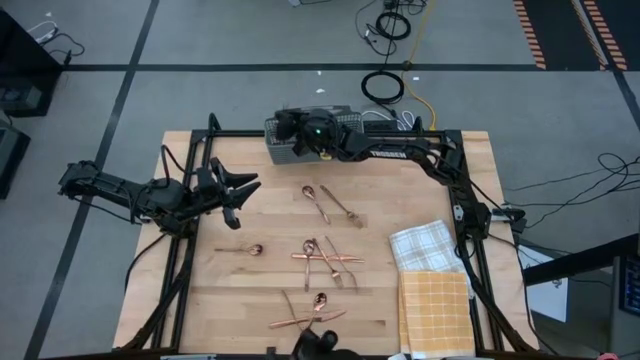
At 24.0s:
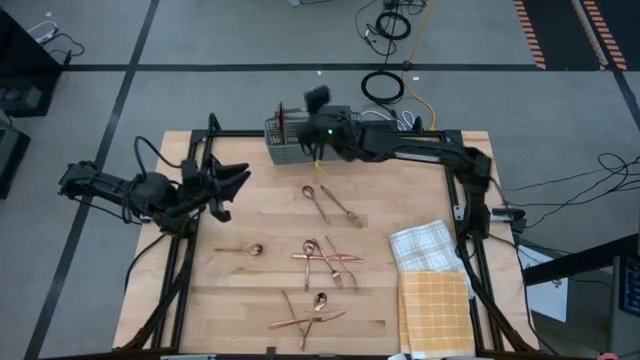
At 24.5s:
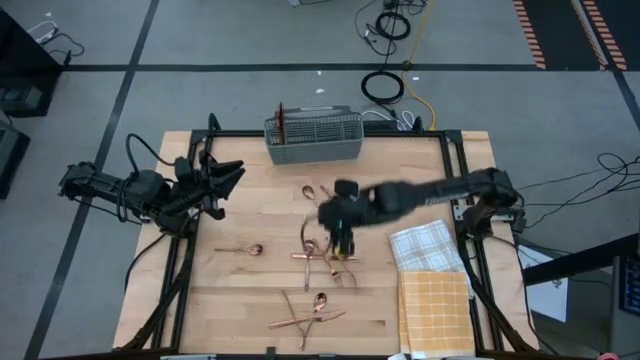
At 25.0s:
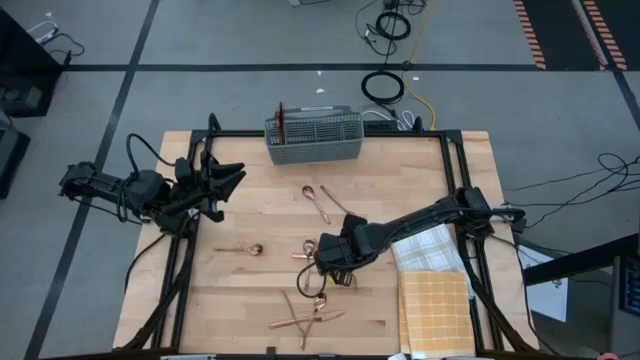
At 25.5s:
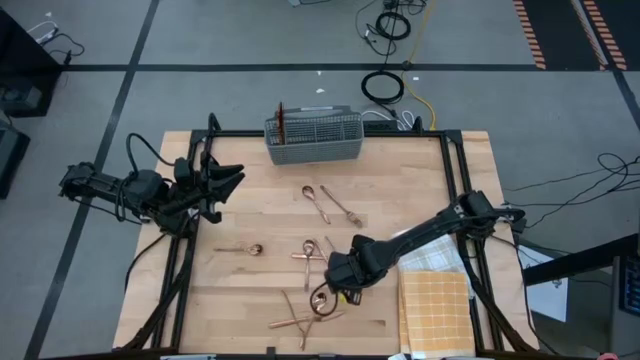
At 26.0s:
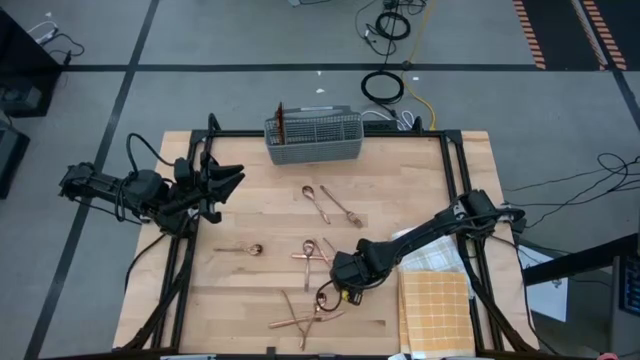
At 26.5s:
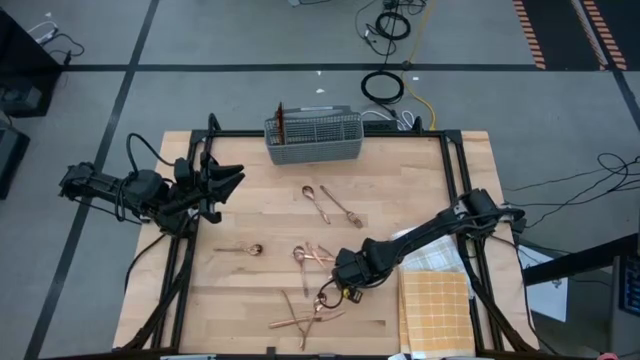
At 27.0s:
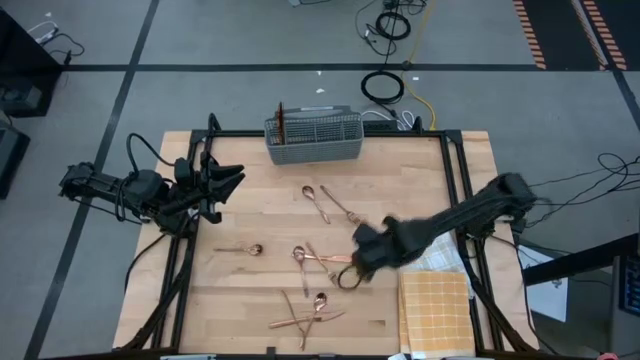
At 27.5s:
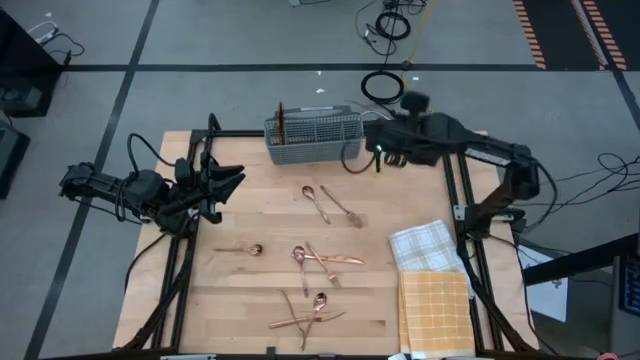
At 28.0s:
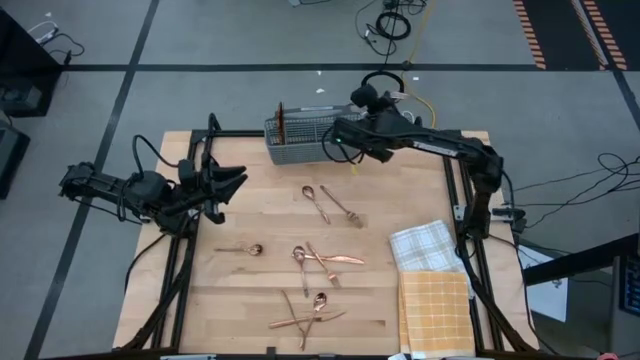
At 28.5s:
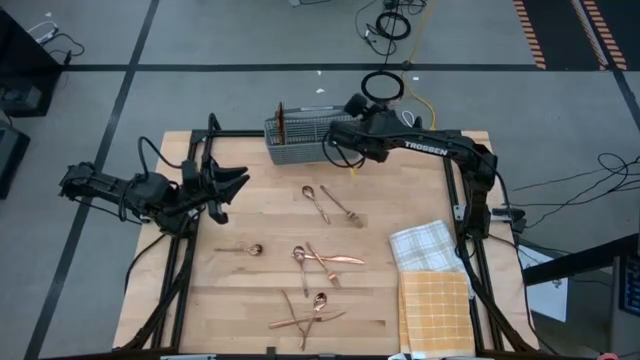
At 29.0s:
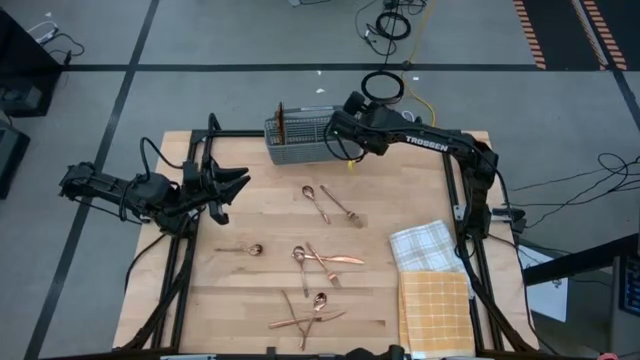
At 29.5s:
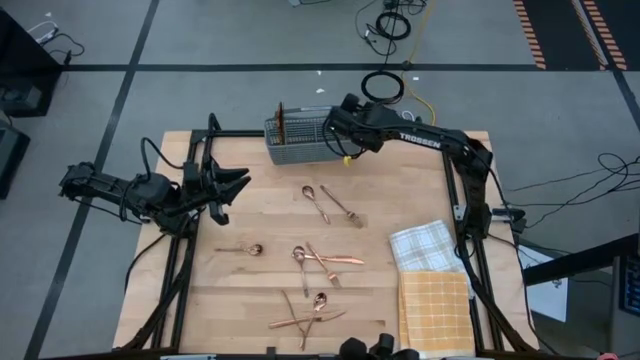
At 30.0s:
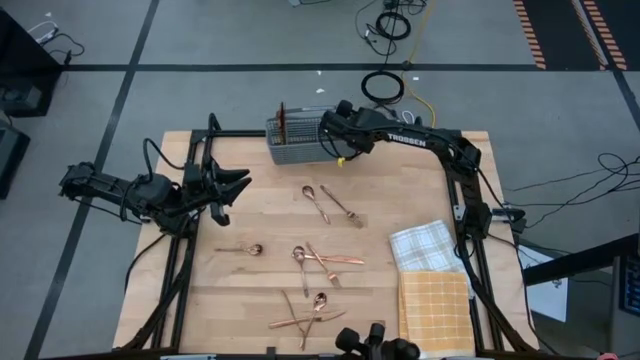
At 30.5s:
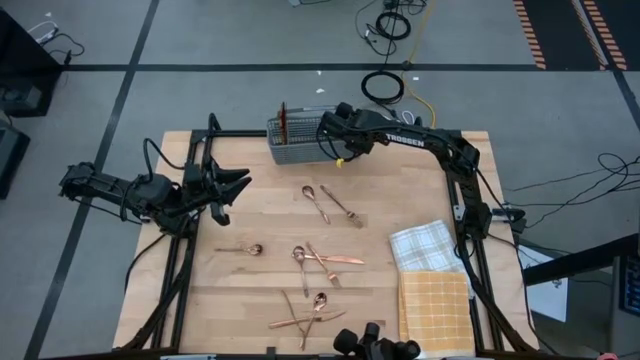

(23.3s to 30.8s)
Task: Sort silverware
Put the center bronze fork into the gray silverware rack

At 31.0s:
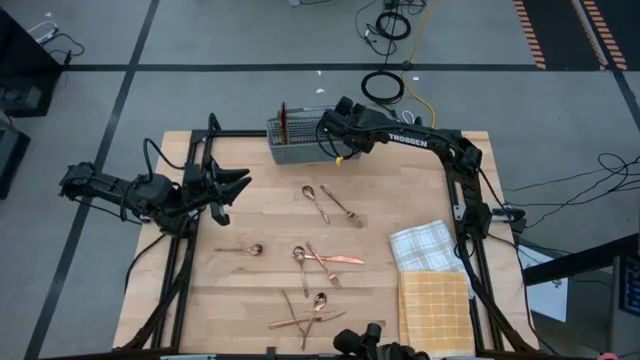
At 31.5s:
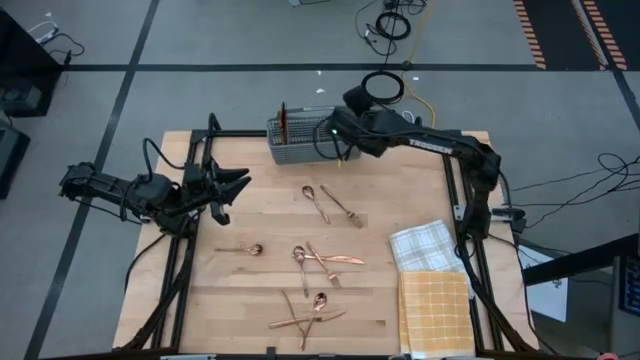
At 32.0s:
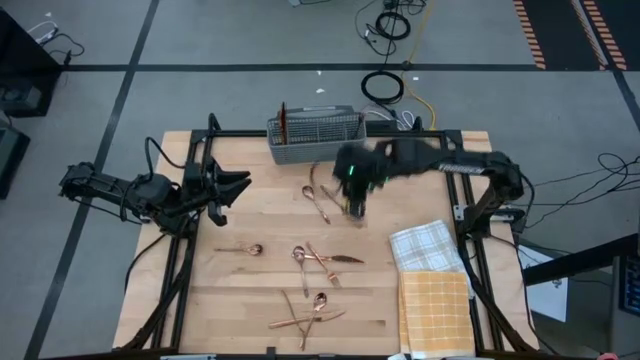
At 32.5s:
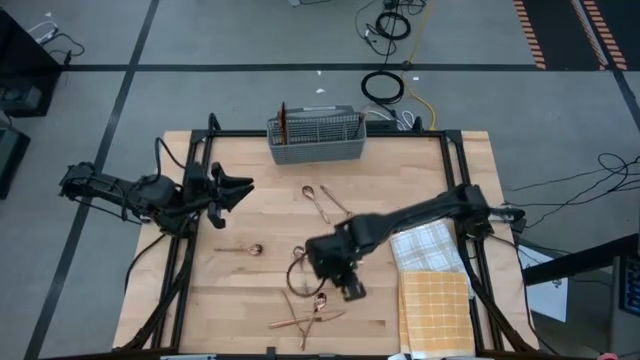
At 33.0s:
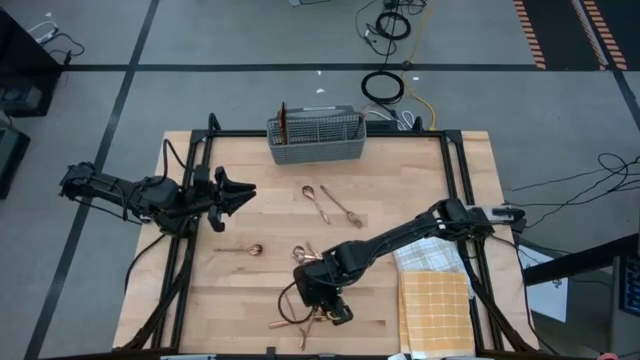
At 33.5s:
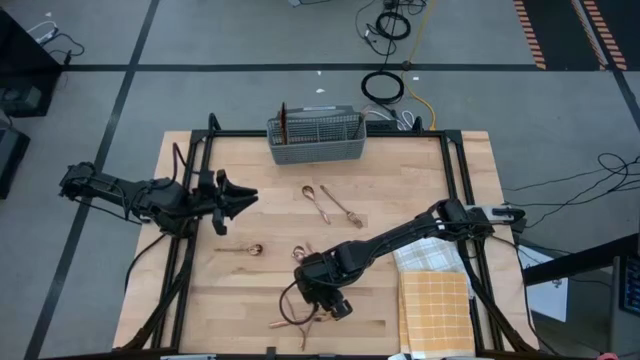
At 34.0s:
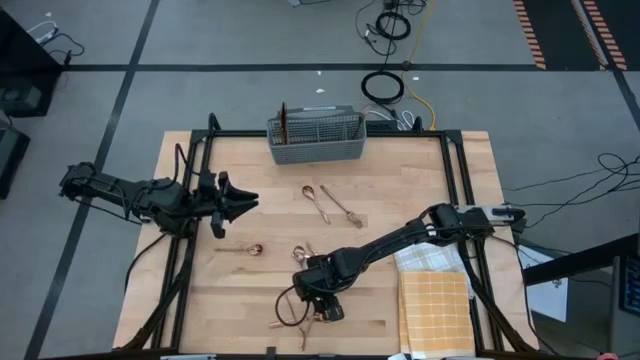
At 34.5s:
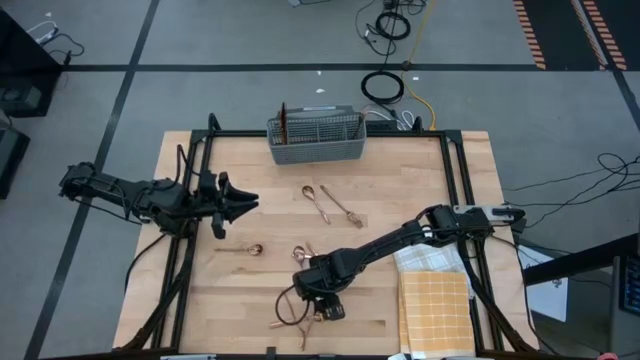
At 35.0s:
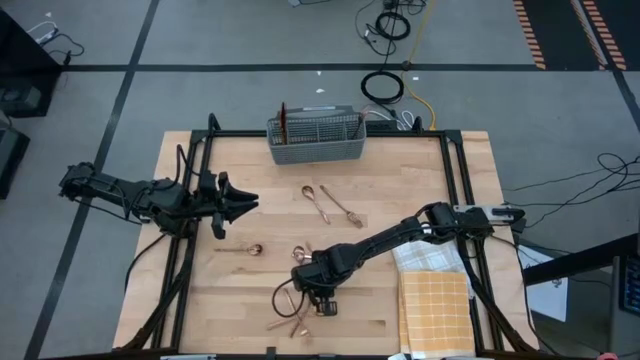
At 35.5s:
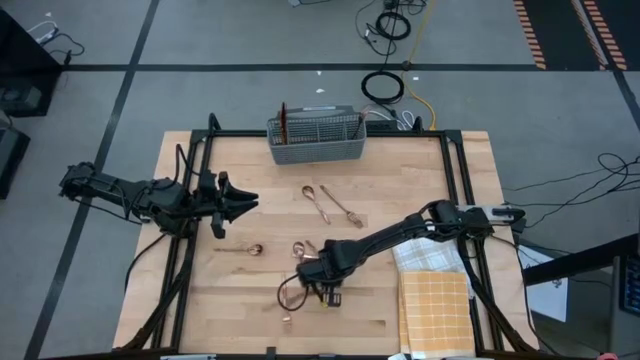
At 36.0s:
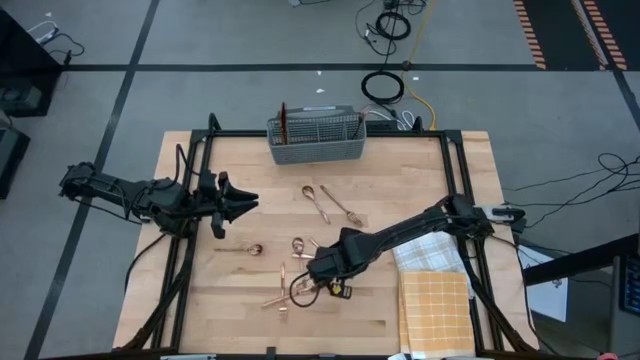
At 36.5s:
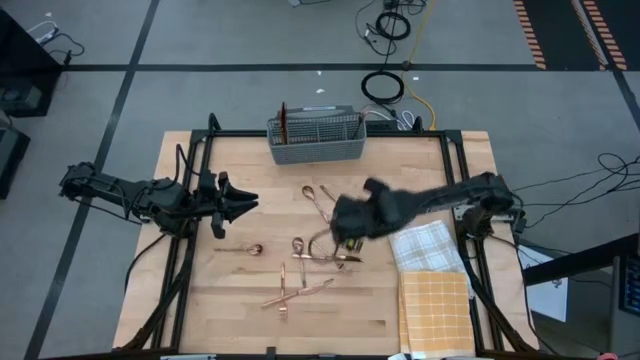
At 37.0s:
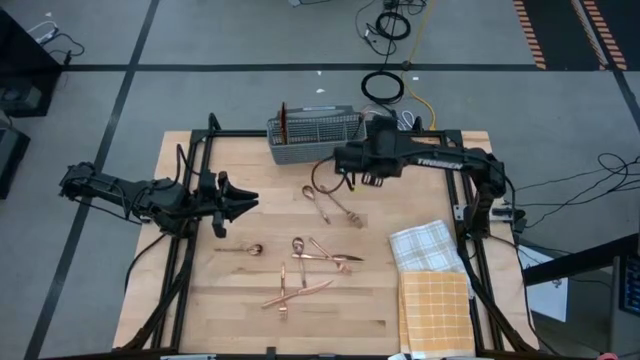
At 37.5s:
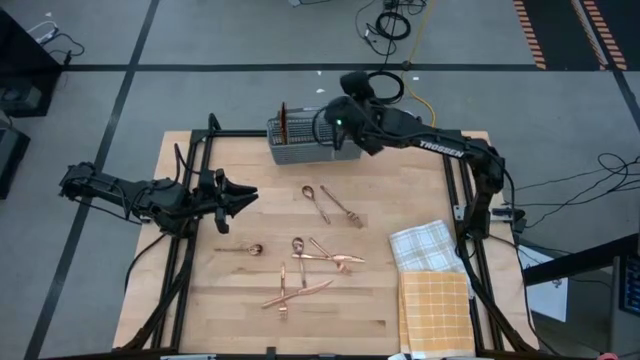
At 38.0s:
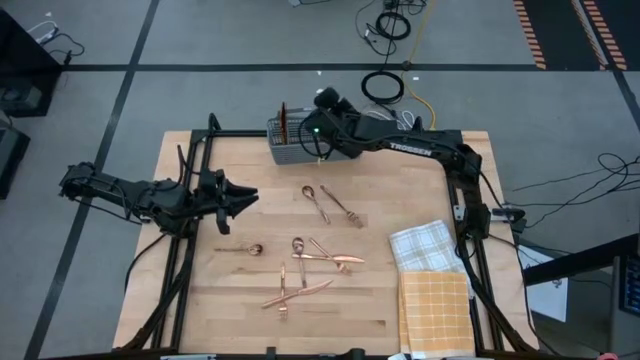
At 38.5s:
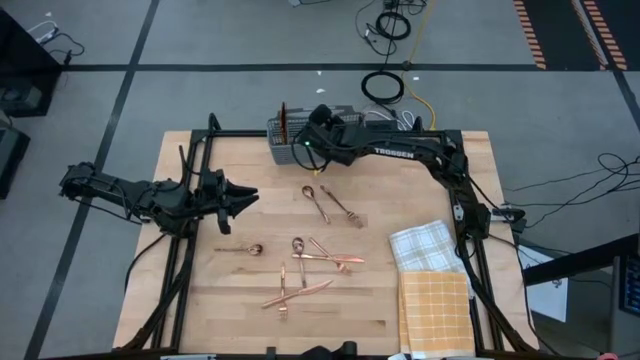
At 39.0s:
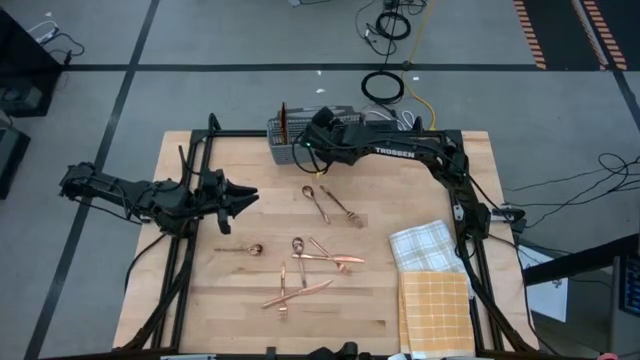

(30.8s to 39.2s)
Put the bottom right bronze spoon into the gray silverware rack

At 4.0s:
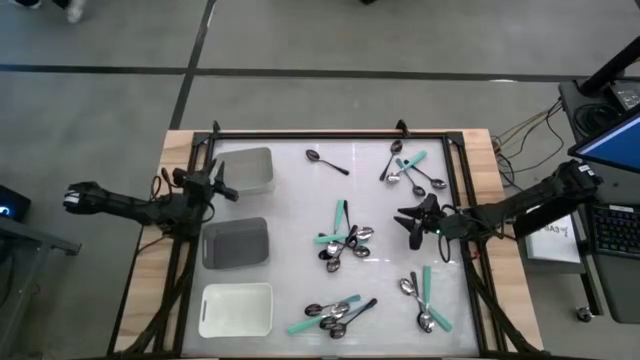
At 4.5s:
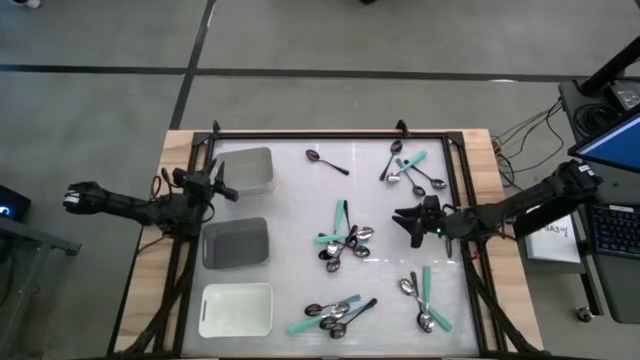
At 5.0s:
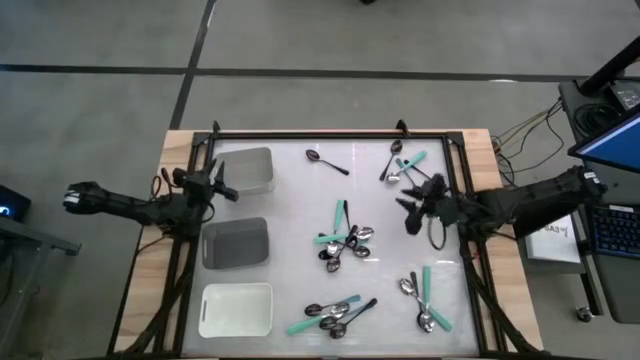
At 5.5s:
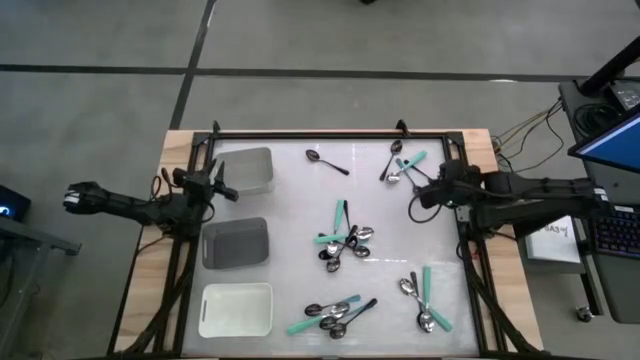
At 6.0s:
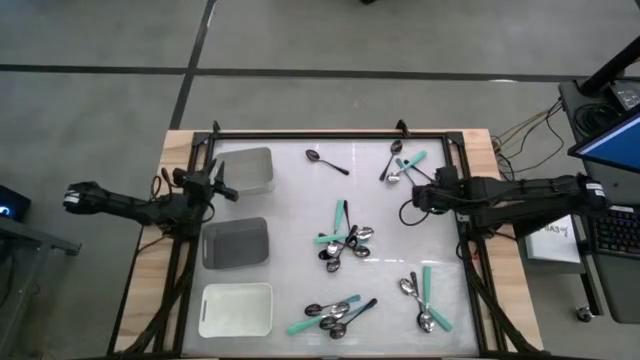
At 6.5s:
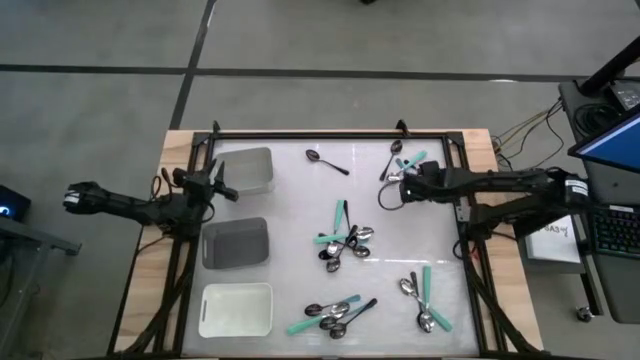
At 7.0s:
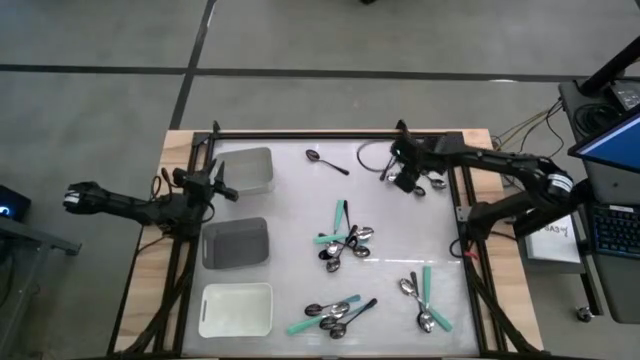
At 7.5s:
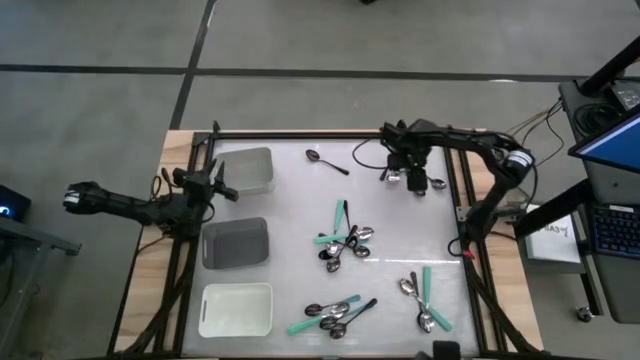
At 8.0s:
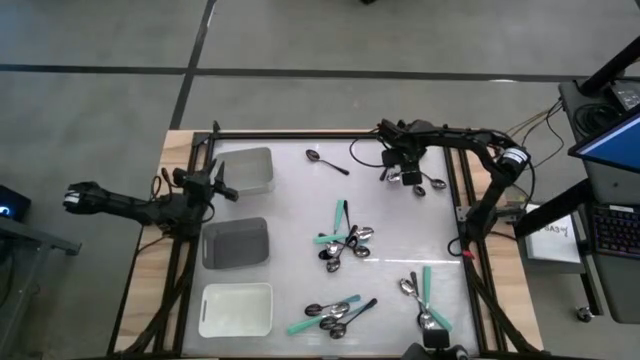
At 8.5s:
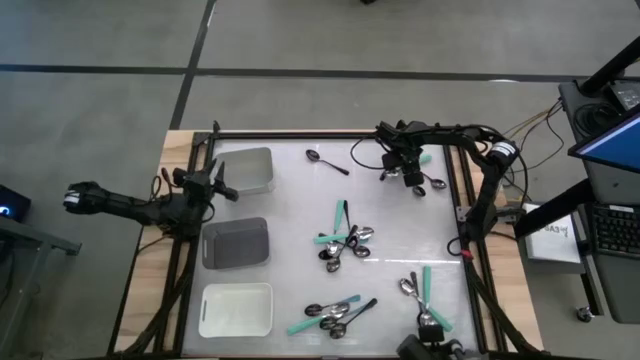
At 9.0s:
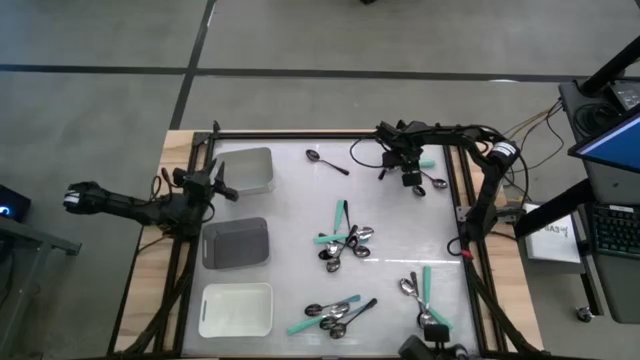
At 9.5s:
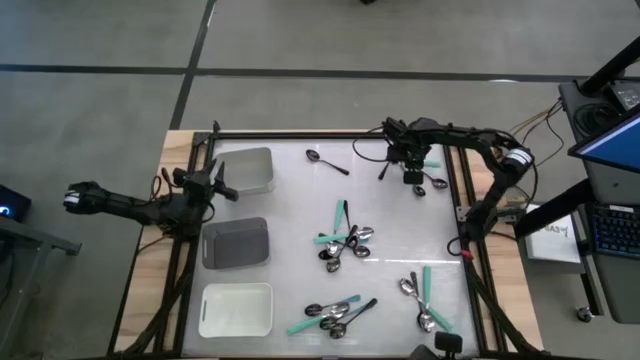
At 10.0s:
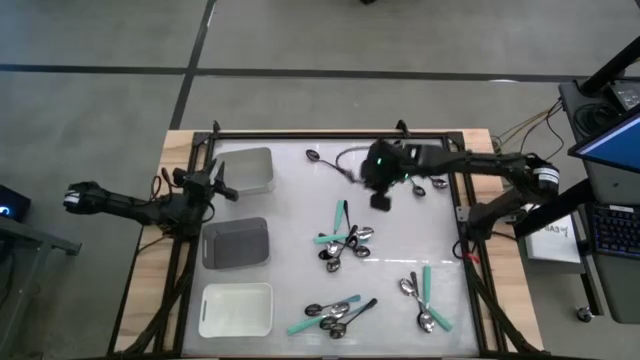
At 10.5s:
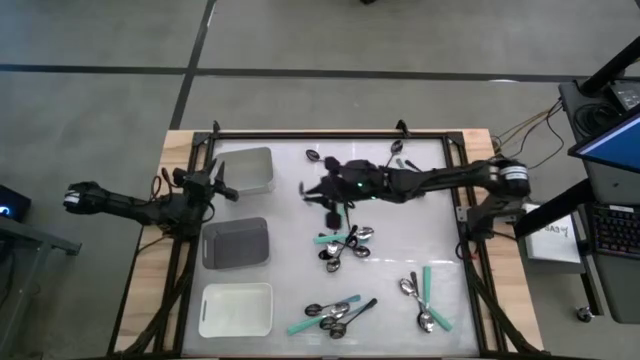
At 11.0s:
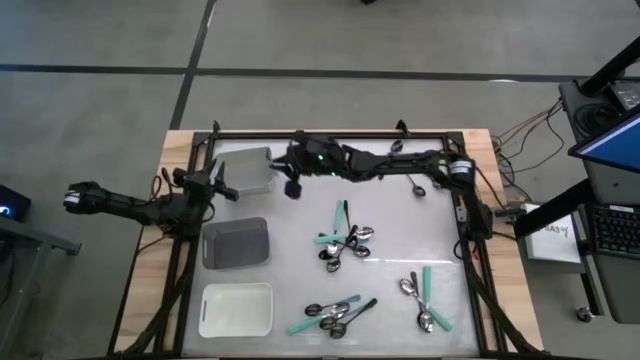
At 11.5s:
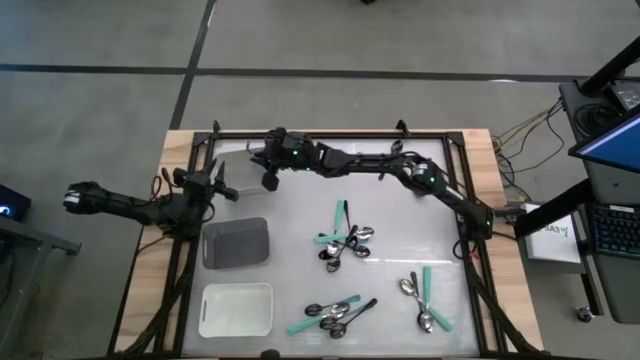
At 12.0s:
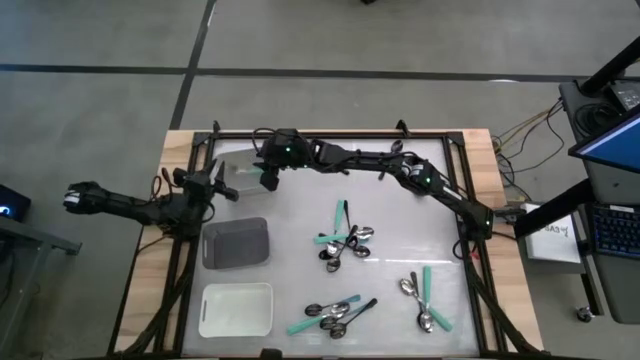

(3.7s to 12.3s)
Task: Sort silverware by color (type)
Put the green spoon into the gray bin
